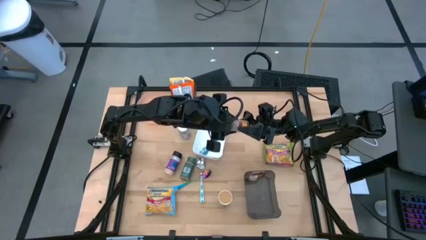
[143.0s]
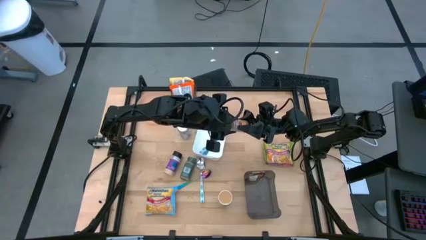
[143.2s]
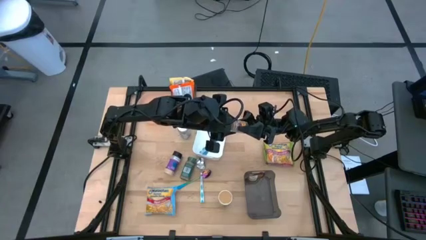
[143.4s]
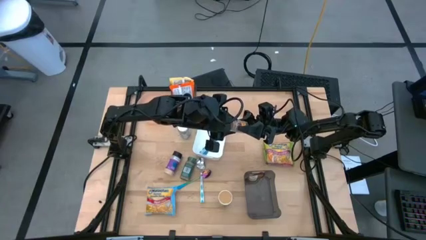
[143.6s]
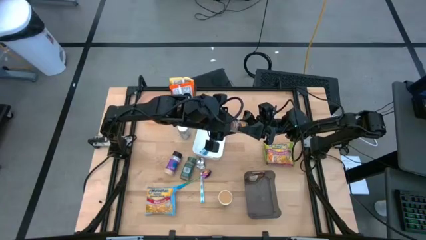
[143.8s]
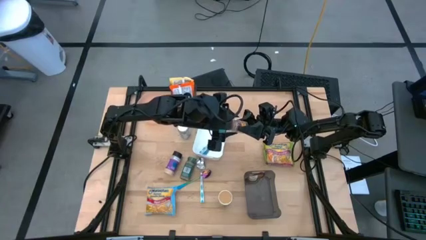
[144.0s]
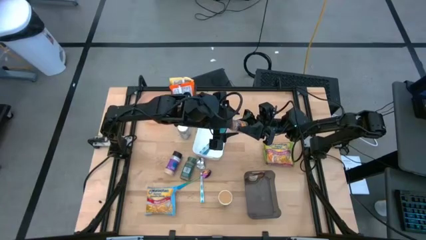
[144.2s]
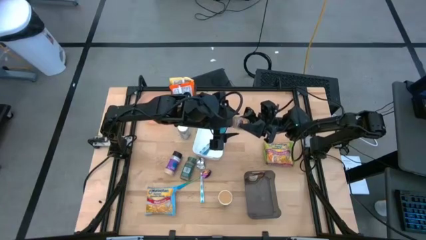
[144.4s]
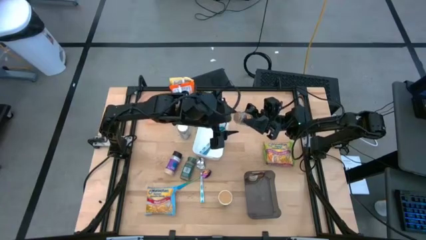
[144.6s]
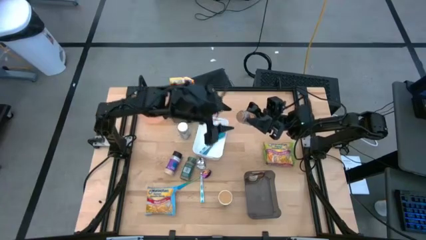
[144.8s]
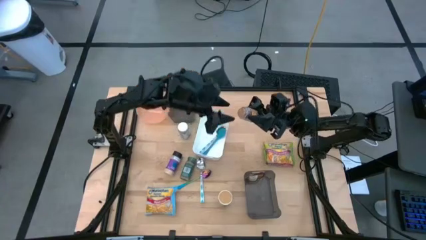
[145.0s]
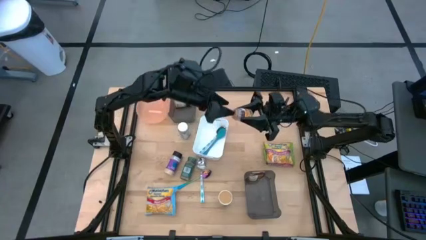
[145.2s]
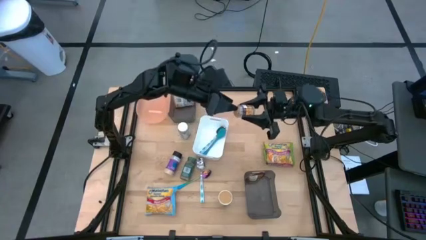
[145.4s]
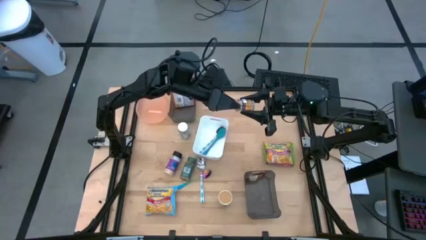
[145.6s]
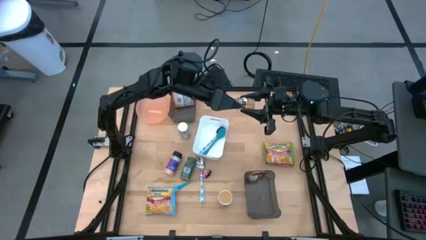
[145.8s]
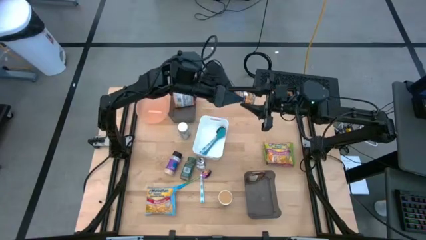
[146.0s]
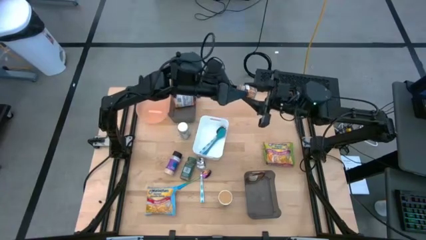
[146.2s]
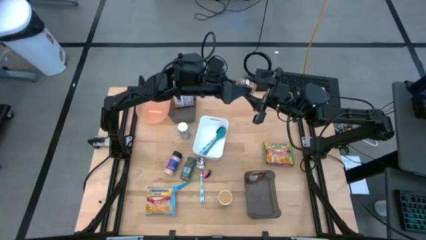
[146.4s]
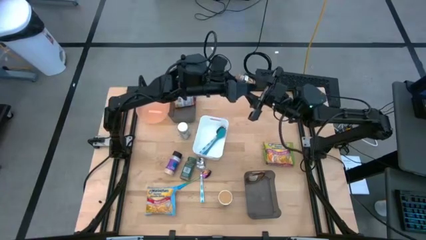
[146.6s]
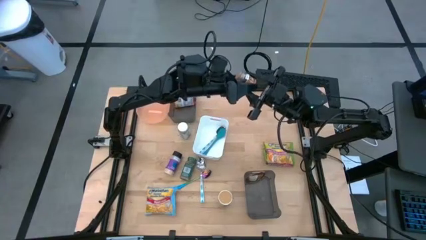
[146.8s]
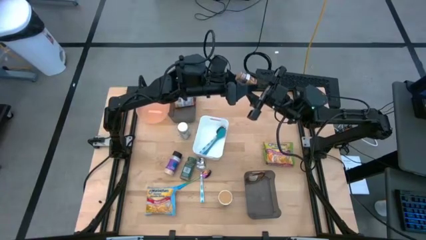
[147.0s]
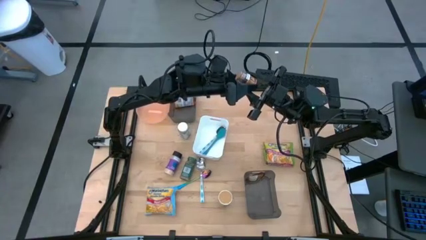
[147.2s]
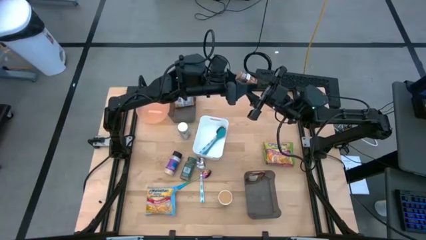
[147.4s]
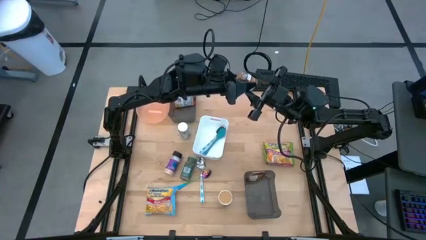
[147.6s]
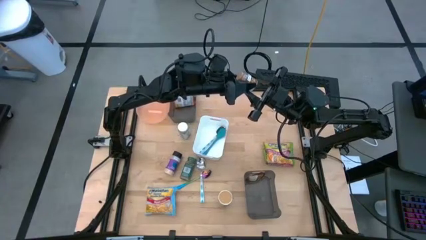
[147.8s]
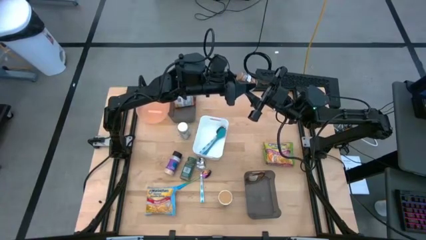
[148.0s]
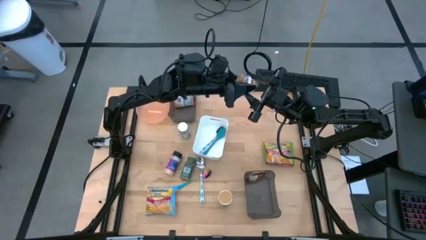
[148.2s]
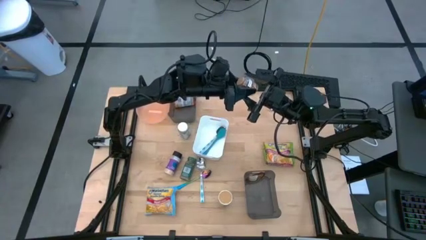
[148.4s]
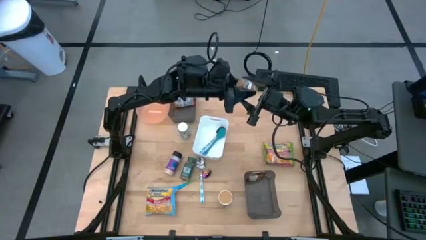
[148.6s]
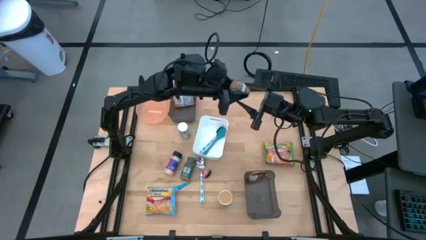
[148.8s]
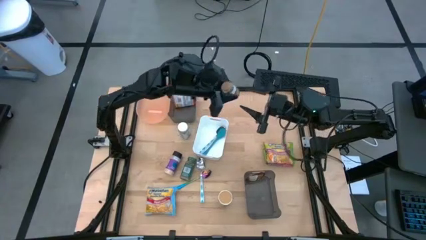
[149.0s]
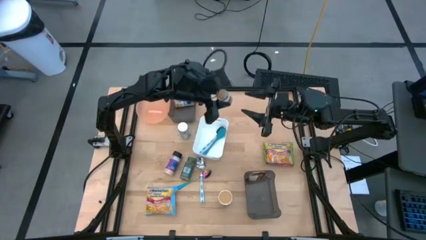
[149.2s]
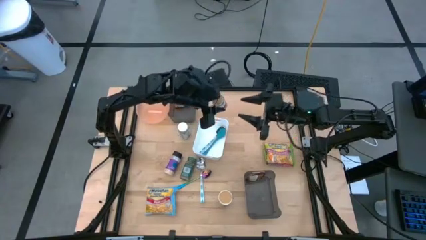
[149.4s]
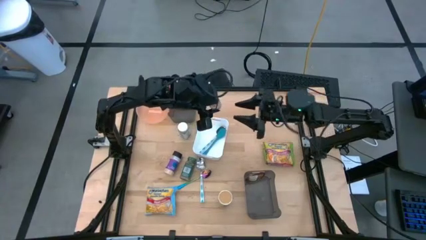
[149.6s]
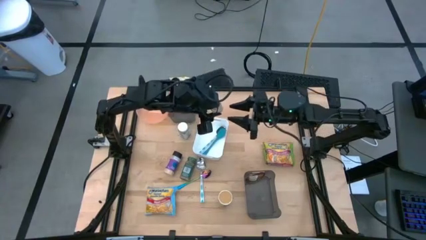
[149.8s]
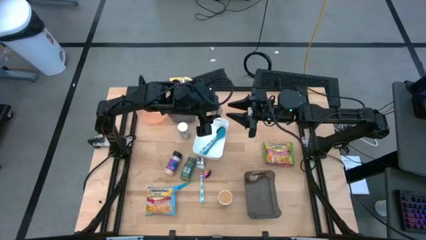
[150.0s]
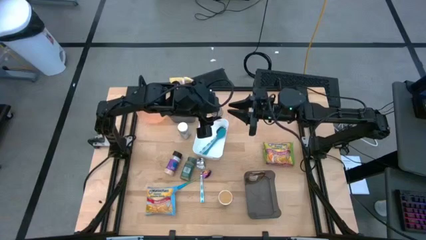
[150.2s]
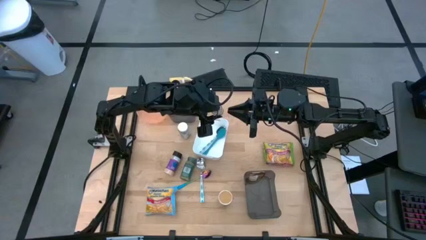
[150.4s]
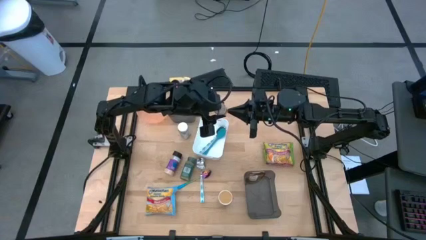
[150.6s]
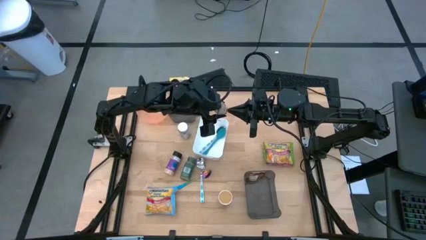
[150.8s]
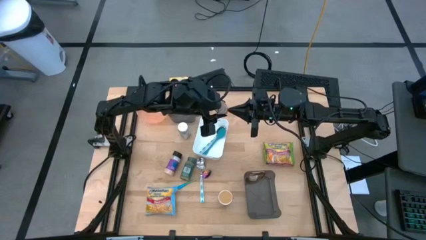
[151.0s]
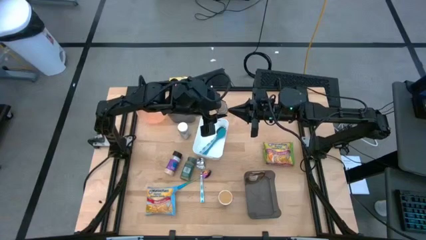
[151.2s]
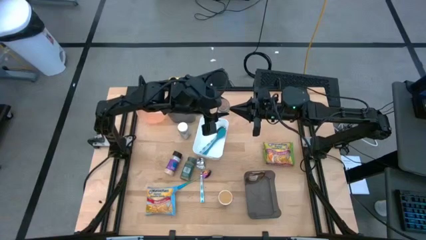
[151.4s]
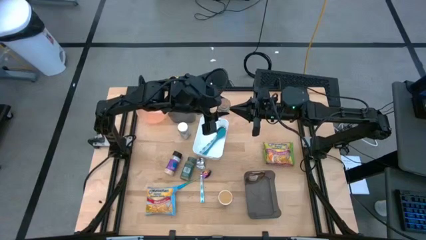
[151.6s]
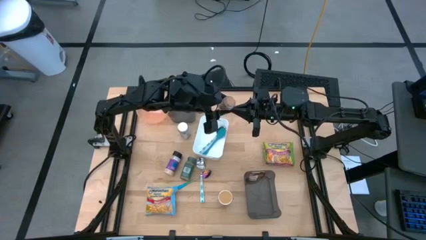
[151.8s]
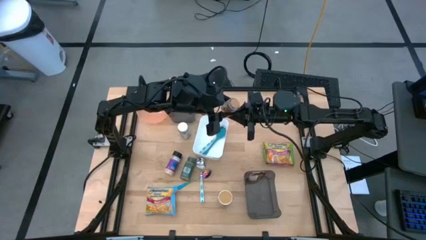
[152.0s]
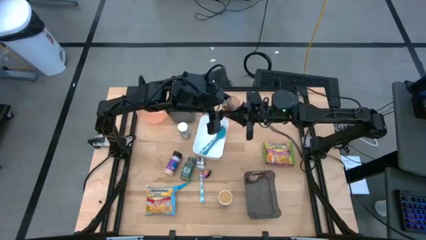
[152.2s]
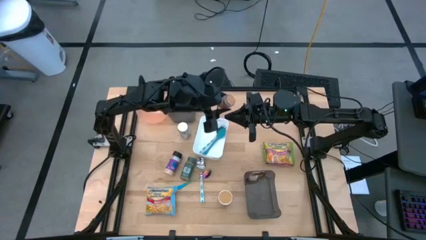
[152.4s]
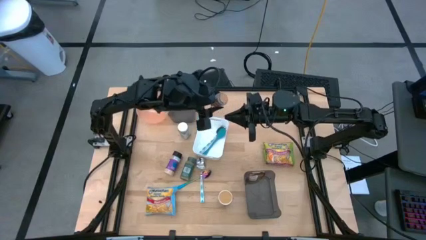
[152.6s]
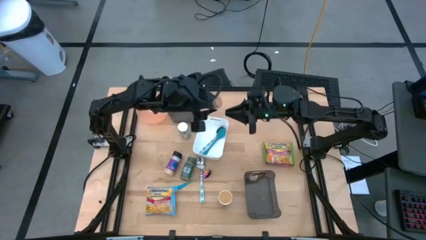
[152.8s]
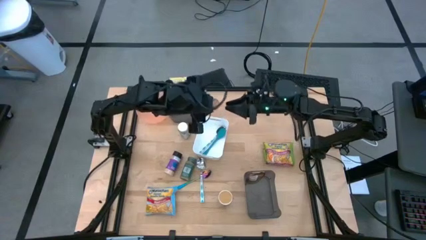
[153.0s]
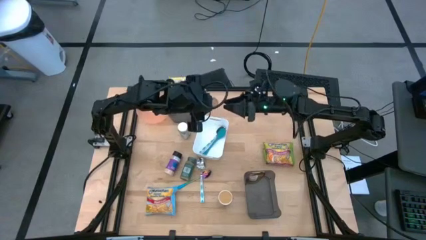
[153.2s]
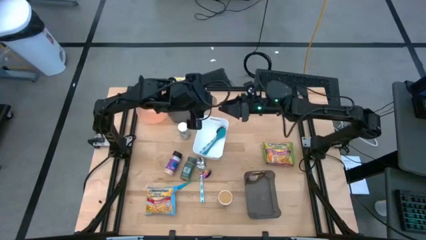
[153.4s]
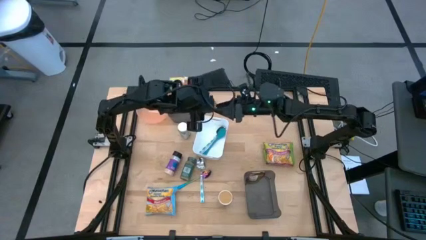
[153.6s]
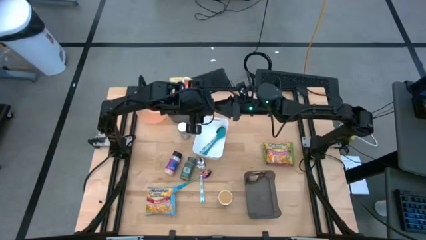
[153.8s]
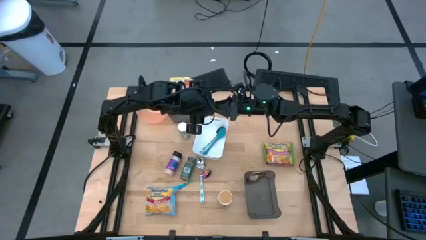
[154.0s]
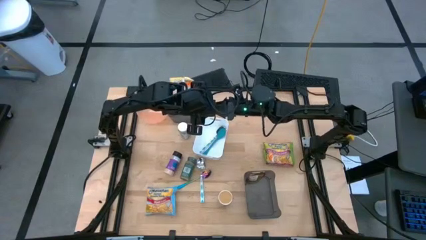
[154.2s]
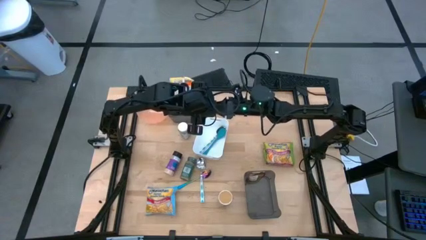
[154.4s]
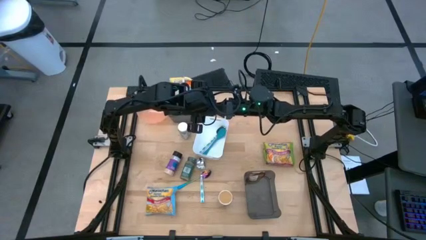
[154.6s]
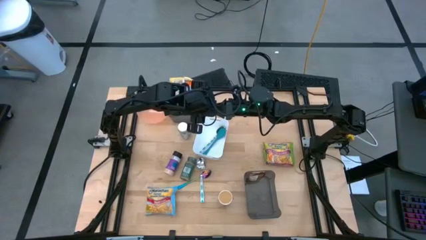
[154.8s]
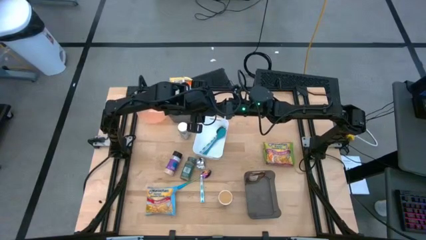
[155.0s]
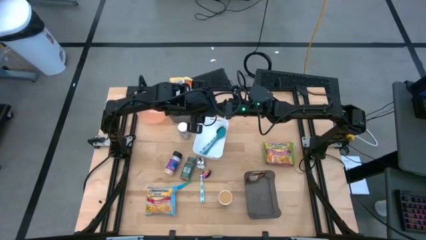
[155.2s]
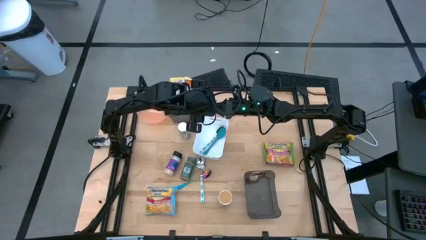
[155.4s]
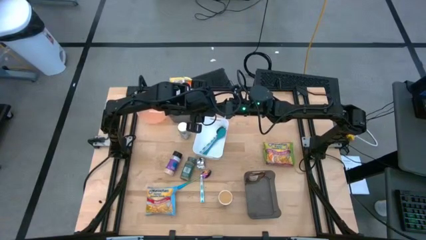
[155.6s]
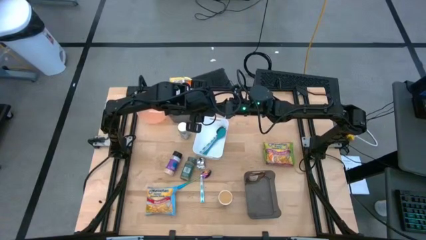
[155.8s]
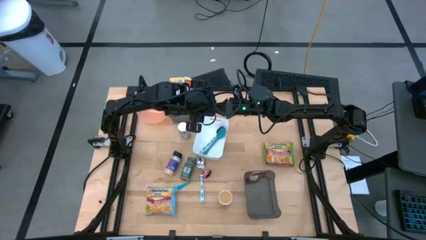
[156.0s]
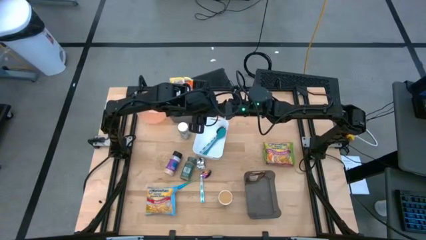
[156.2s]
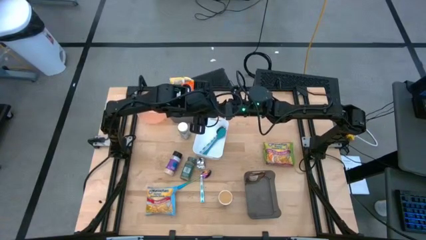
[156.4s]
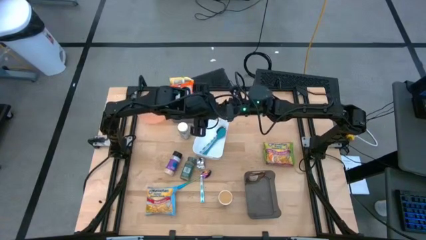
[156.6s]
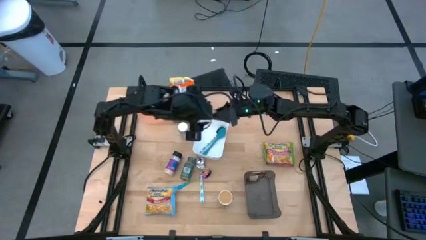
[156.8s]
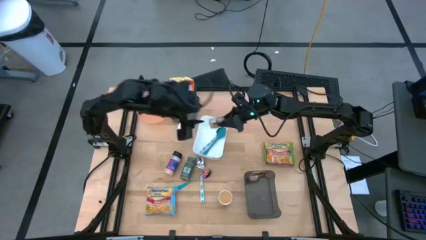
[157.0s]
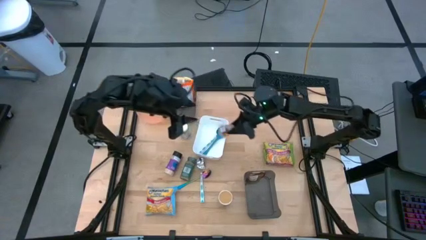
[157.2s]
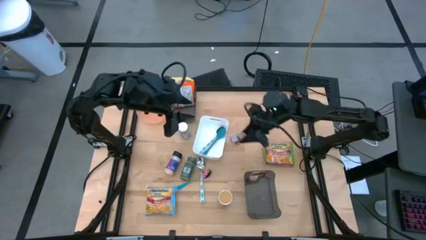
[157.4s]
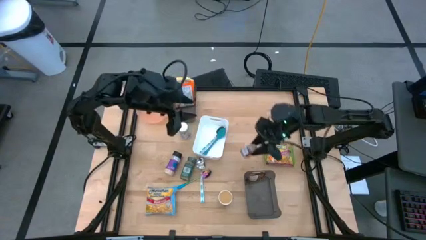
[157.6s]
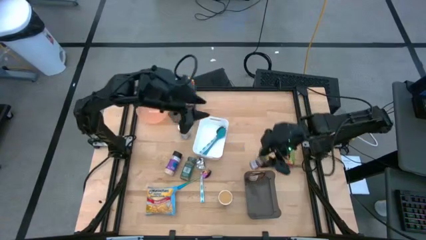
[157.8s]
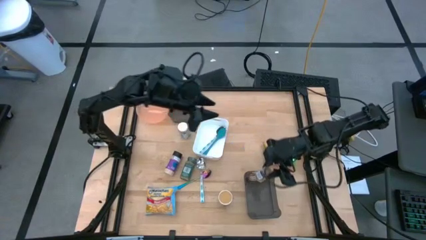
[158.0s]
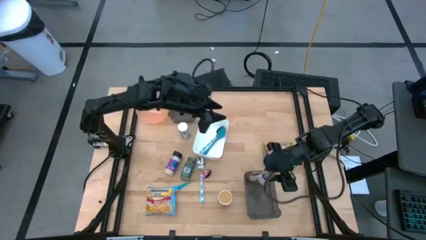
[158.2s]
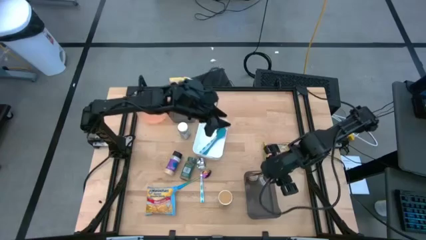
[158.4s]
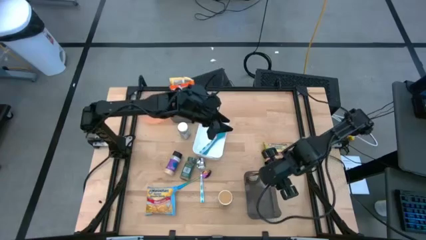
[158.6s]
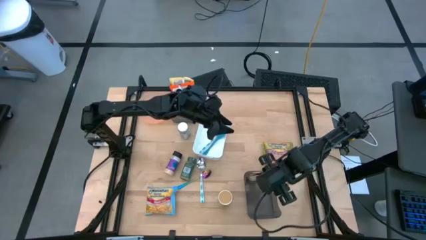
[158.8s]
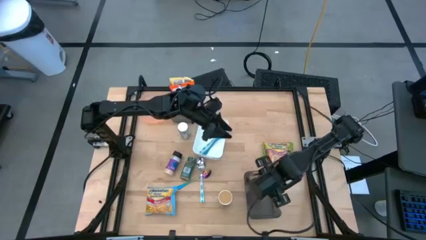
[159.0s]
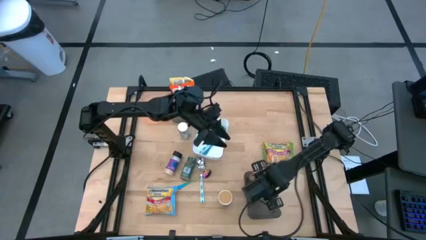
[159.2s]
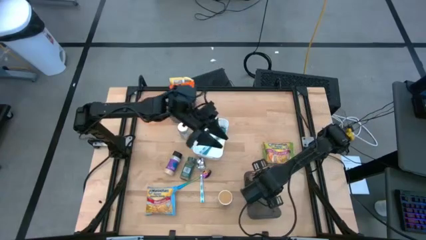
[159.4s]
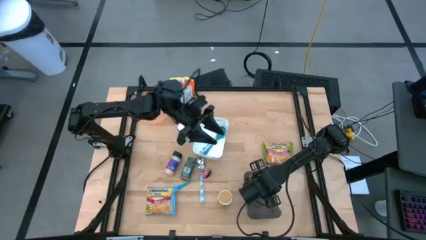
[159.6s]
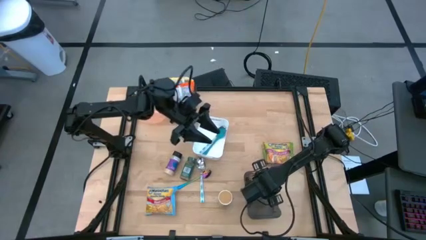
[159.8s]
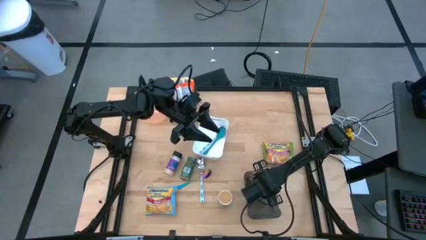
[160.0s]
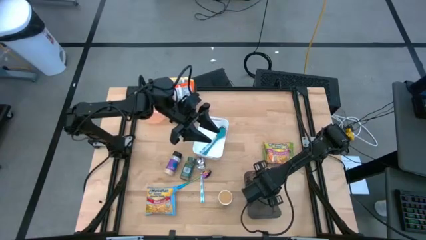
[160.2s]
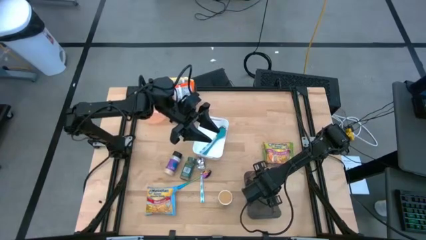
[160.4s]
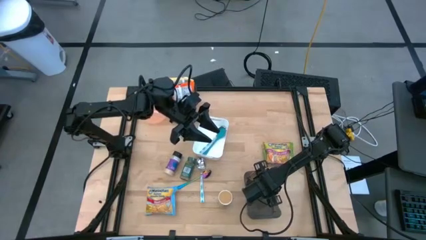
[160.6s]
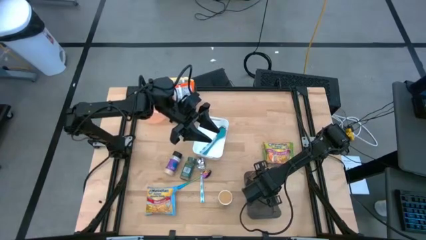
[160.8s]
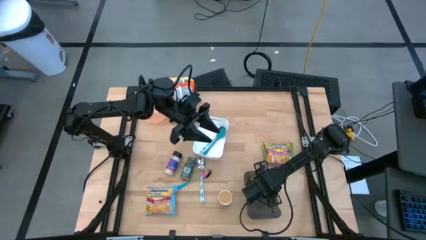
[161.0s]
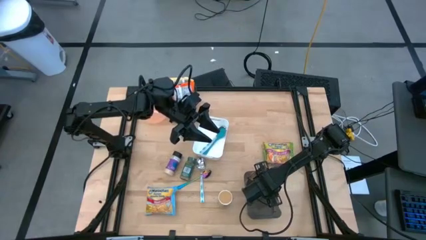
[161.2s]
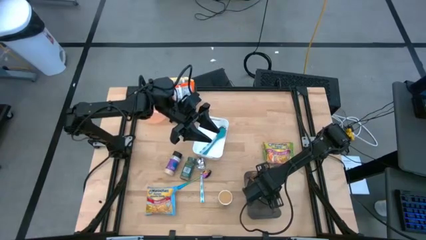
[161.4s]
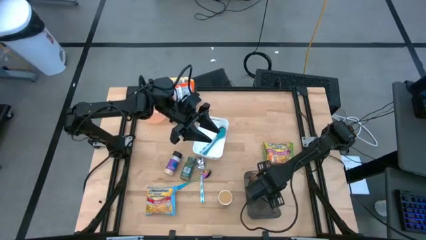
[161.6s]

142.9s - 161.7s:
Task: Pick & Place Food Item
Put the brown seasoning bottle into the bottom black bin
